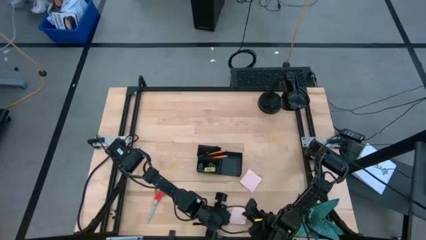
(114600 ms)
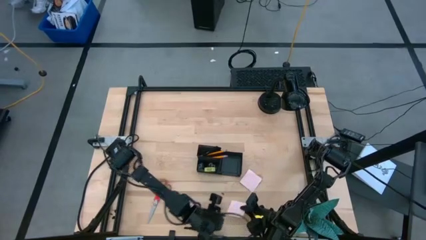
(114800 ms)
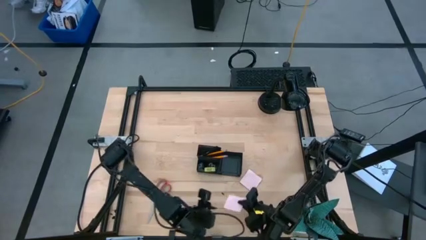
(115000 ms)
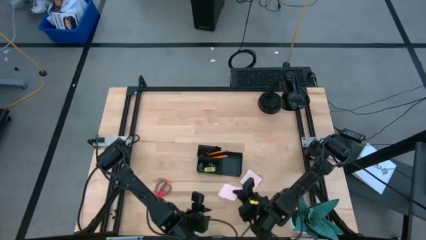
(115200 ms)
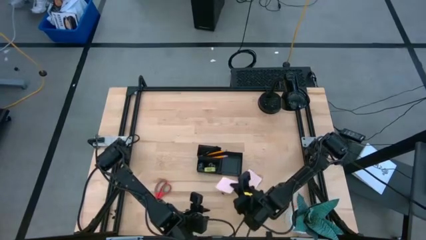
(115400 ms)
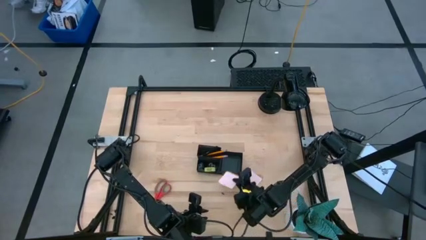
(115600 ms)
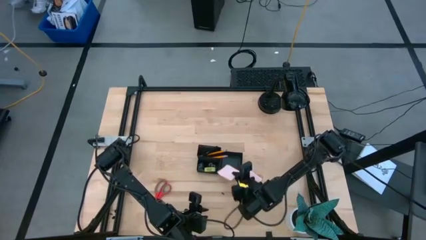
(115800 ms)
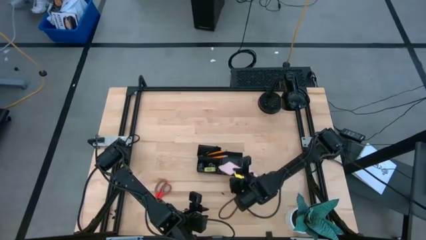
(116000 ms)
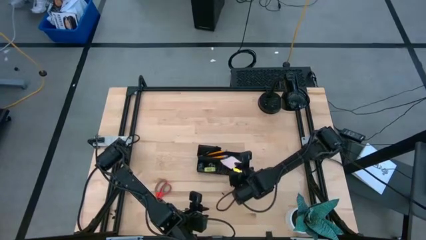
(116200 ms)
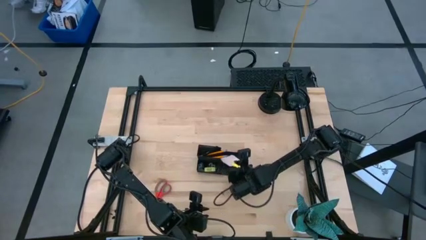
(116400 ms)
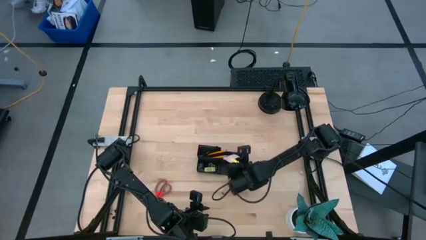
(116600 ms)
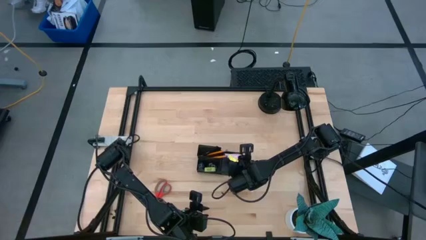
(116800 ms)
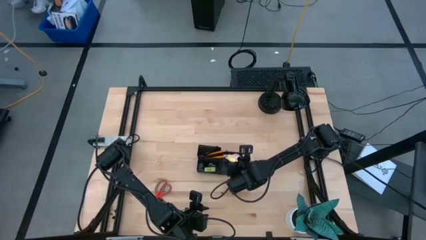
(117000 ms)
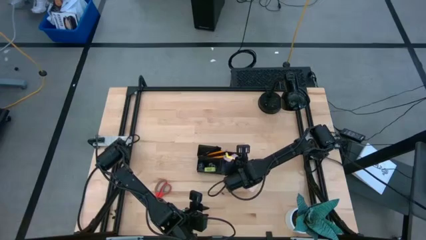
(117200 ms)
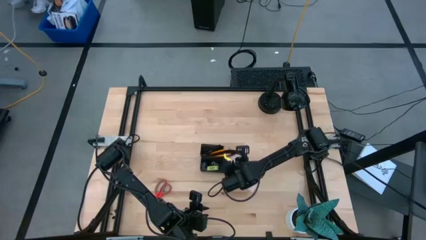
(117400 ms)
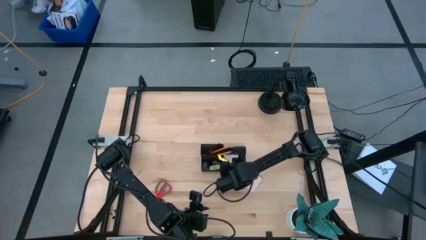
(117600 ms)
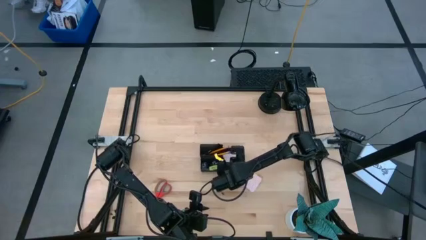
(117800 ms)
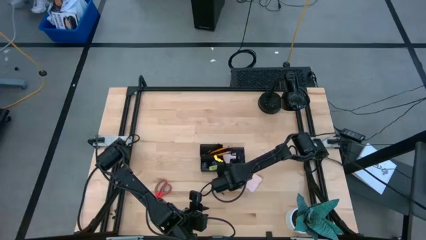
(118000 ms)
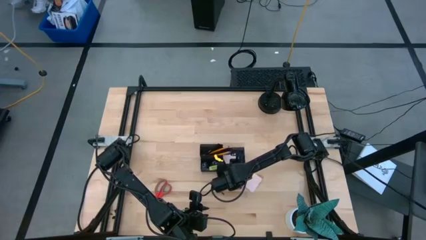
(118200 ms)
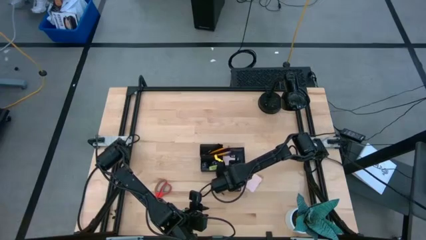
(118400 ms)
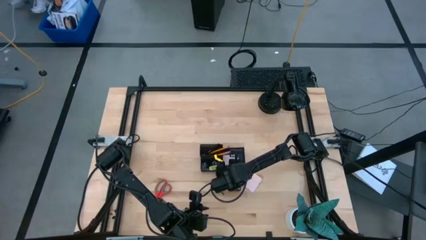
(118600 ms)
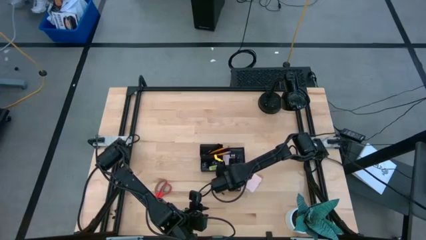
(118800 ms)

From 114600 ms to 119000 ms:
Task: Pick and place office supplies into organizer
Put the top sticky notes into the right section of the desk organizer

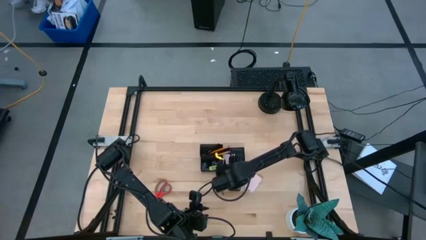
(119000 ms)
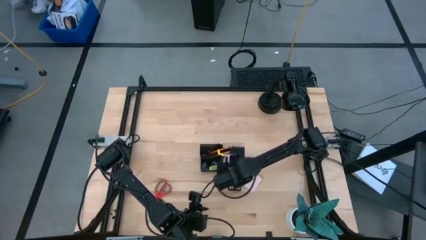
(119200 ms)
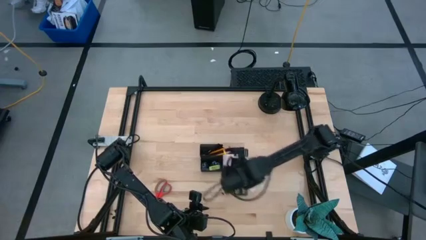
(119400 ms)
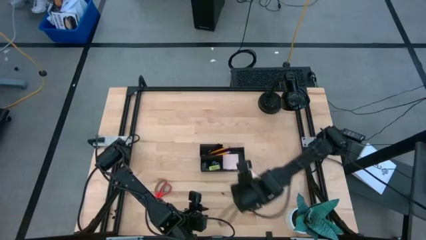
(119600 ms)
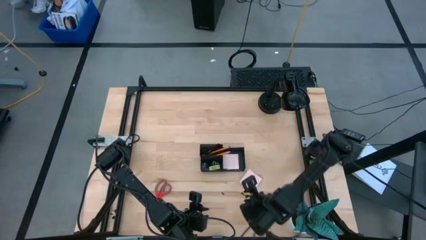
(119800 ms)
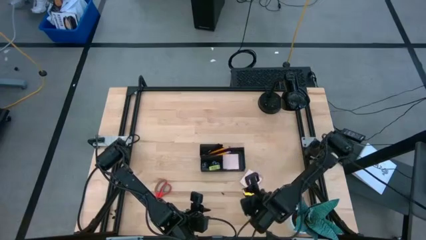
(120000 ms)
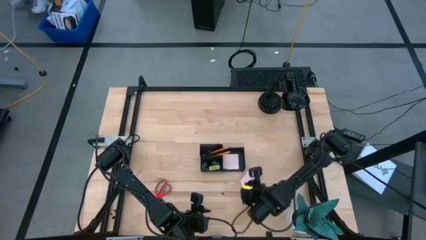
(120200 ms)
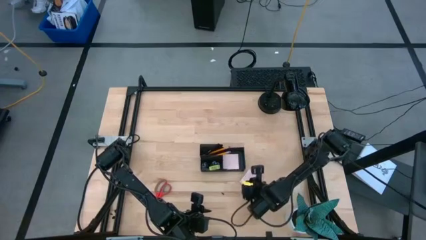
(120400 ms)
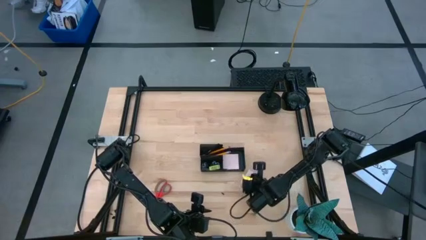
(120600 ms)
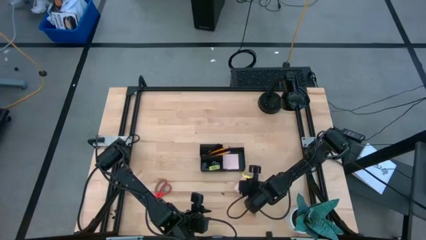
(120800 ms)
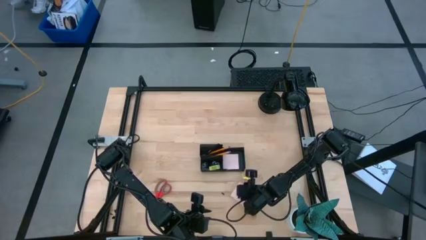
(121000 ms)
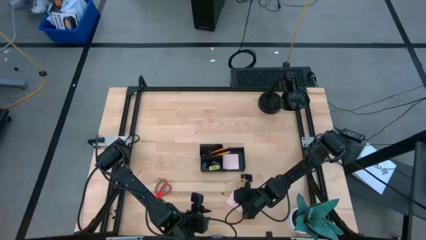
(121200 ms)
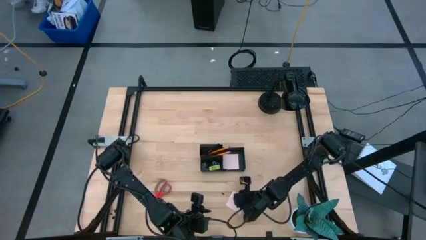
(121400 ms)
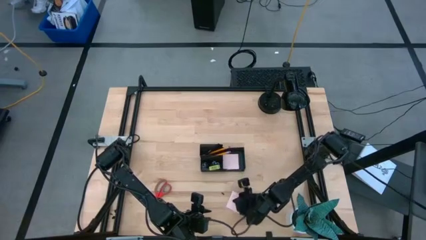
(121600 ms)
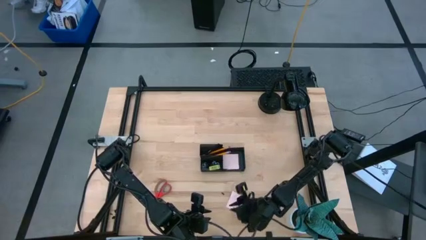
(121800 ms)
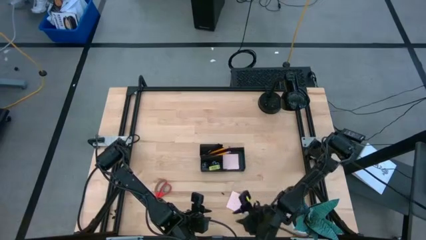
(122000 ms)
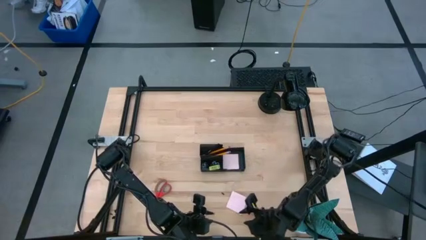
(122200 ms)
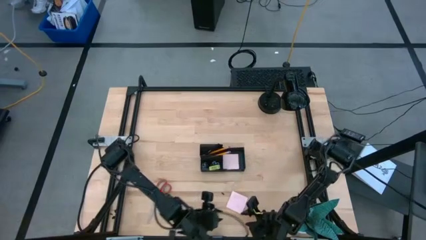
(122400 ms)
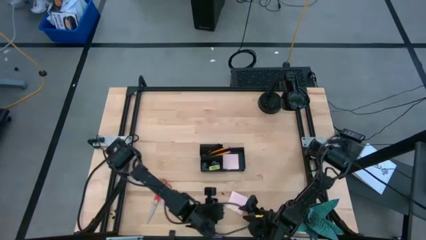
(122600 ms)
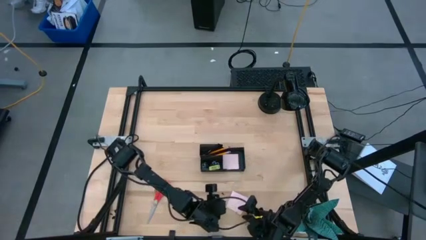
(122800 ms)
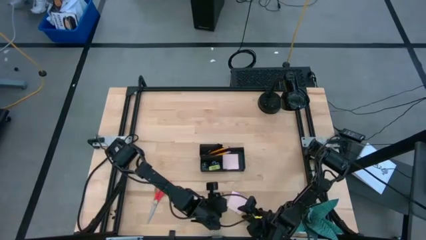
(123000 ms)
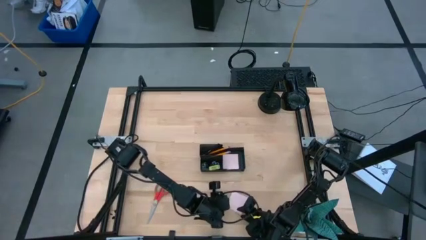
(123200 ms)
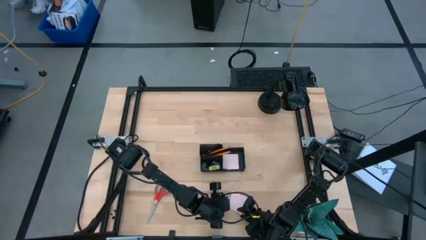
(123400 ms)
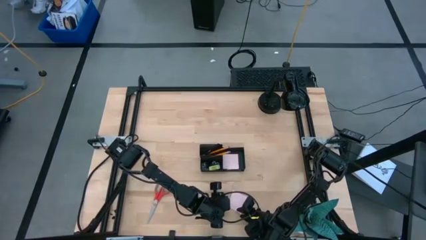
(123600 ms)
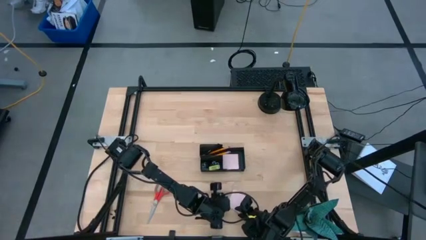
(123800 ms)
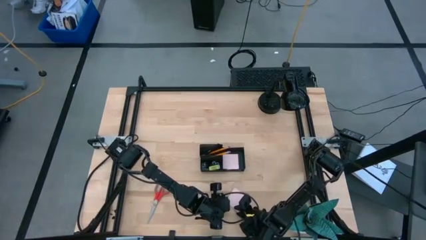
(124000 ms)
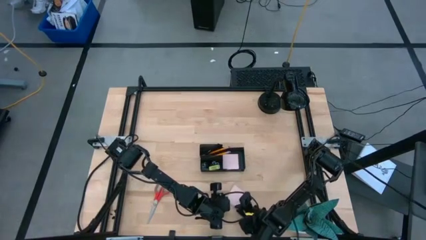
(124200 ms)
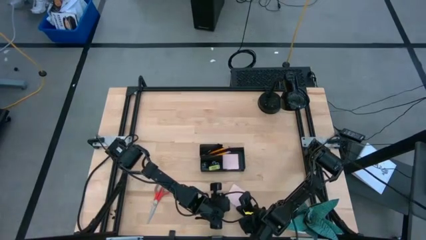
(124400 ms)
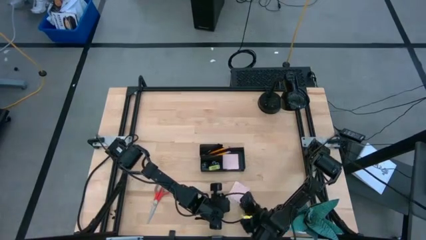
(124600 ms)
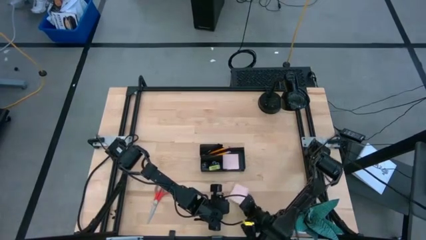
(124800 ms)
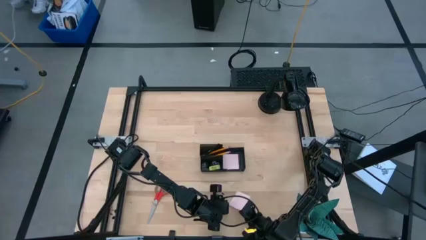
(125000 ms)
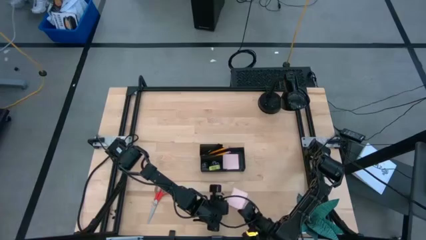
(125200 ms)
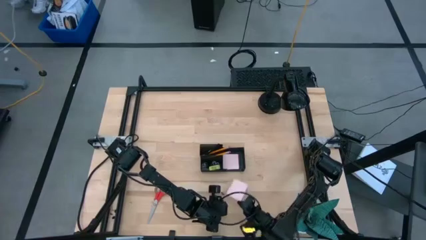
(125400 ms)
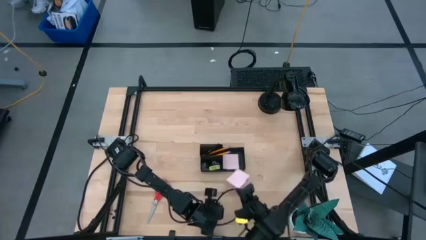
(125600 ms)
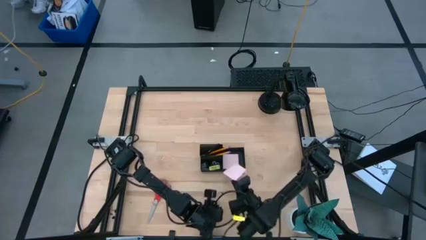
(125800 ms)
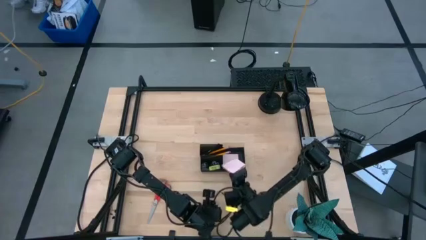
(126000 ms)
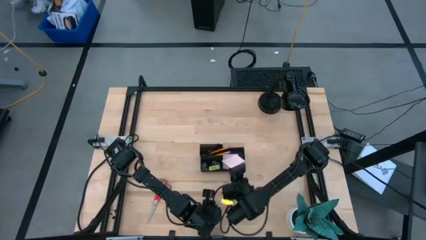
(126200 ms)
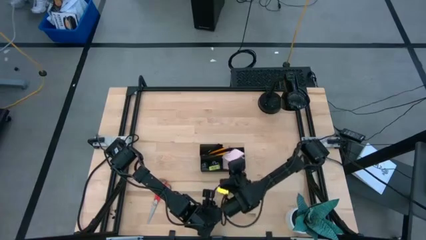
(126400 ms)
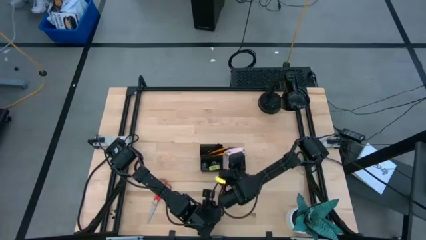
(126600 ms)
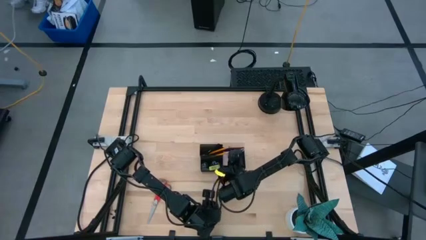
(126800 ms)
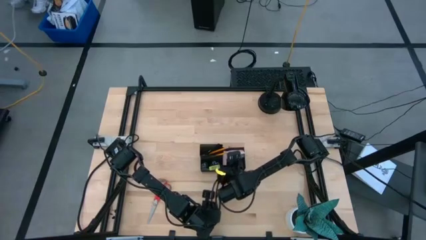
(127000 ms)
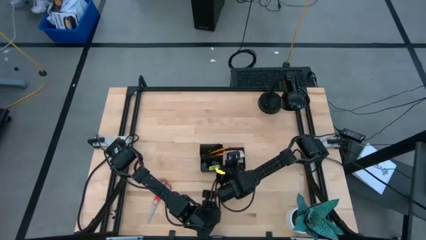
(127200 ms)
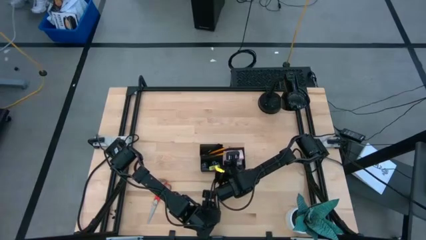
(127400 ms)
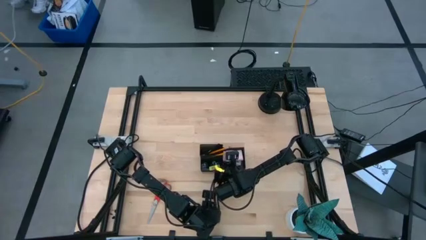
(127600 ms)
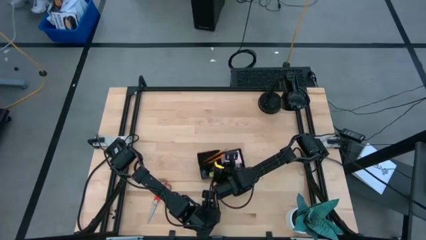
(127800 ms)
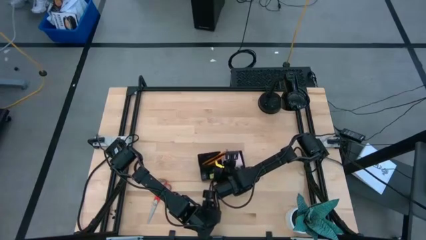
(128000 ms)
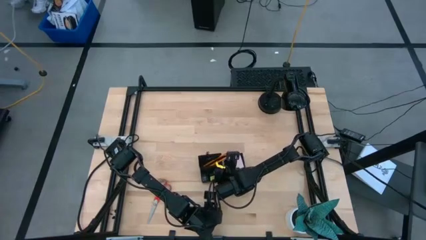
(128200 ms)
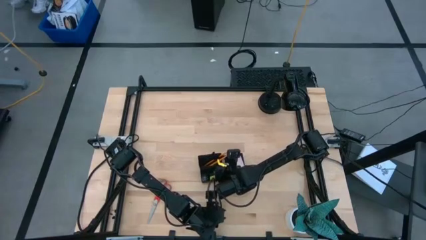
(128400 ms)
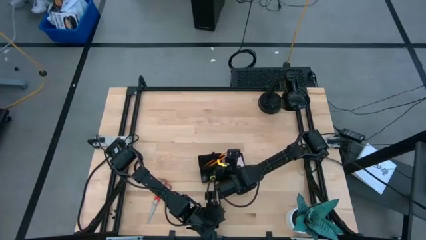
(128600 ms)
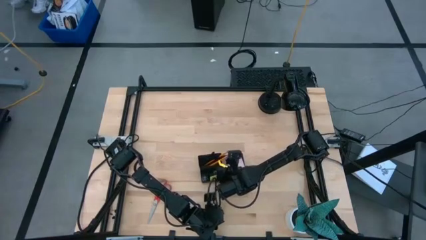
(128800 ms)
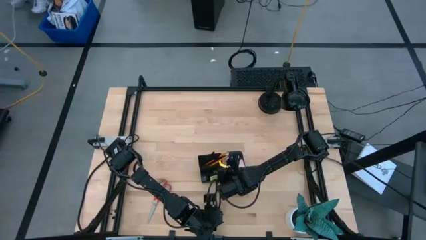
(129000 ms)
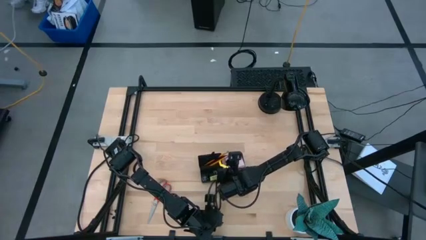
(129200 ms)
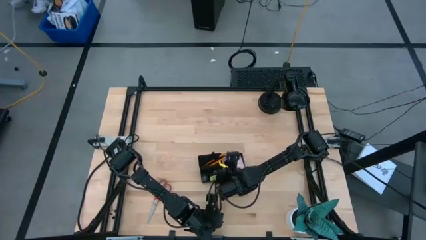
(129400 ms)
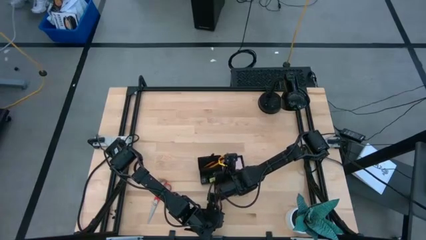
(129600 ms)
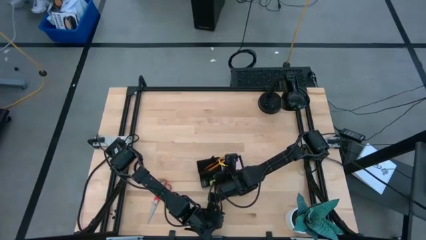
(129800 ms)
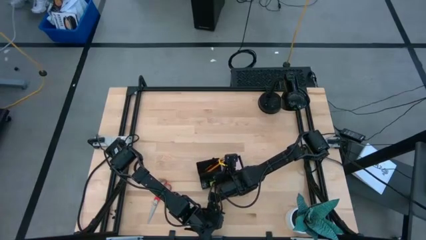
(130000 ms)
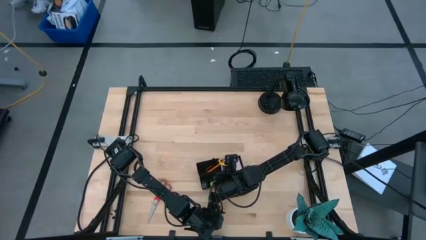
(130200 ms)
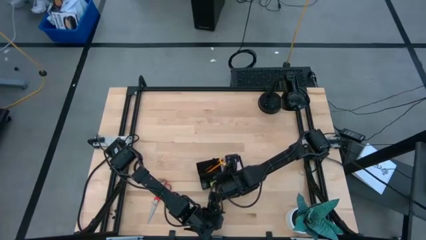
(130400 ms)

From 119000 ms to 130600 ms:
Put the sticky notes into the right section of the desk organizer
